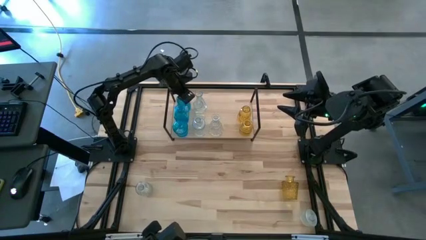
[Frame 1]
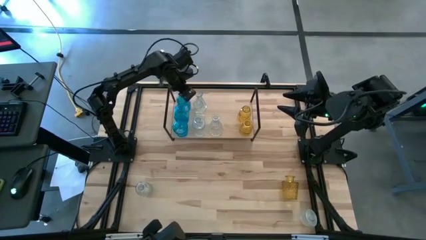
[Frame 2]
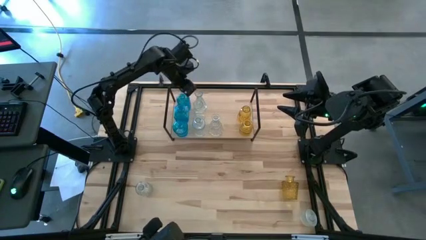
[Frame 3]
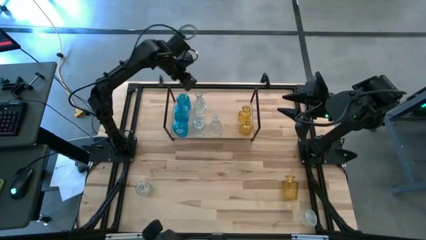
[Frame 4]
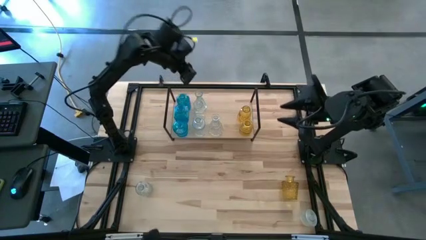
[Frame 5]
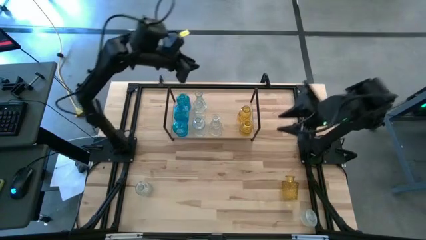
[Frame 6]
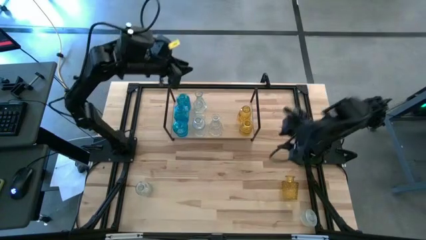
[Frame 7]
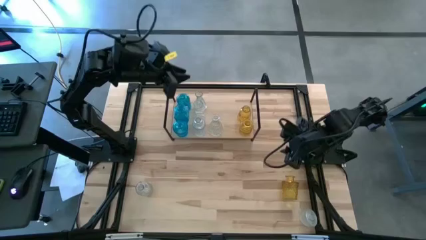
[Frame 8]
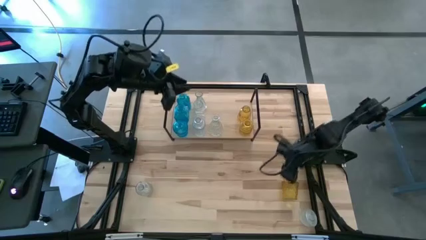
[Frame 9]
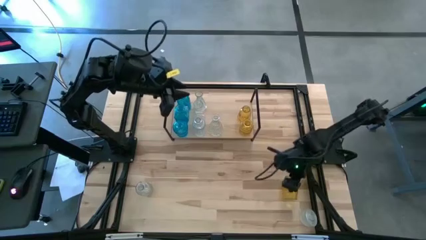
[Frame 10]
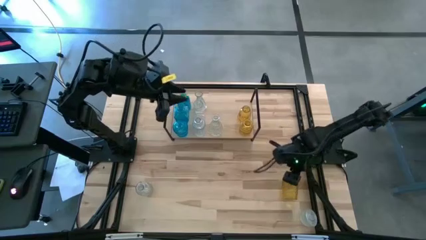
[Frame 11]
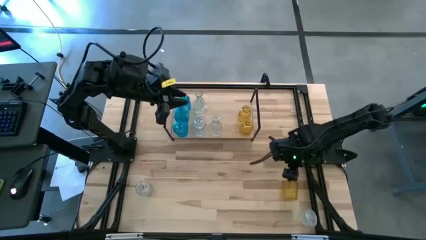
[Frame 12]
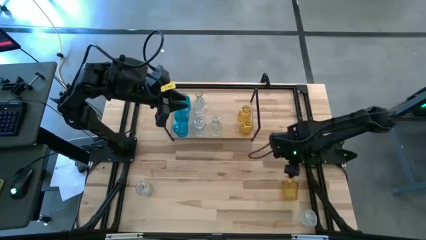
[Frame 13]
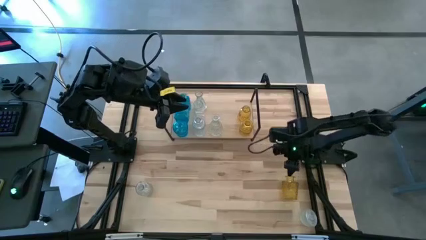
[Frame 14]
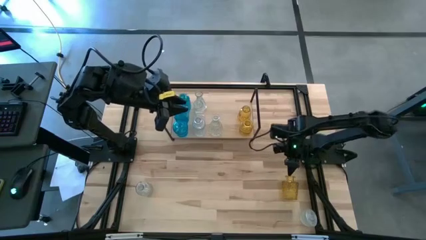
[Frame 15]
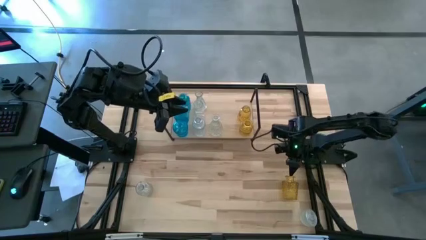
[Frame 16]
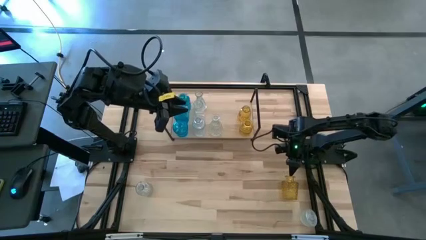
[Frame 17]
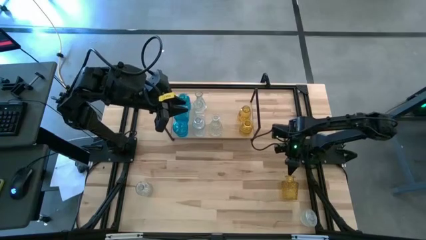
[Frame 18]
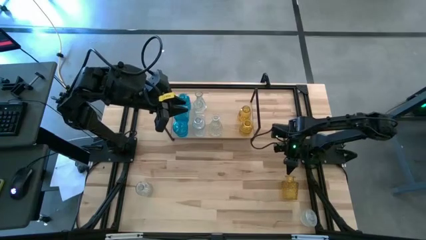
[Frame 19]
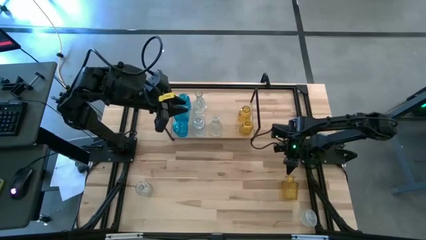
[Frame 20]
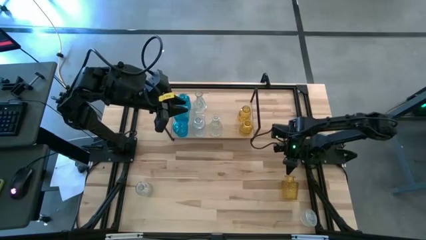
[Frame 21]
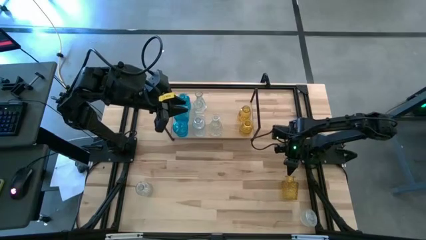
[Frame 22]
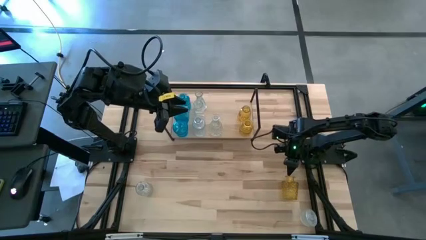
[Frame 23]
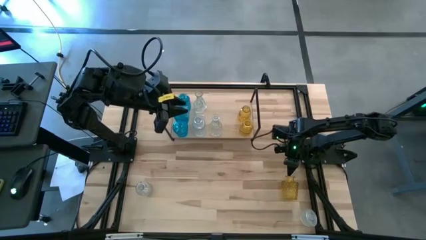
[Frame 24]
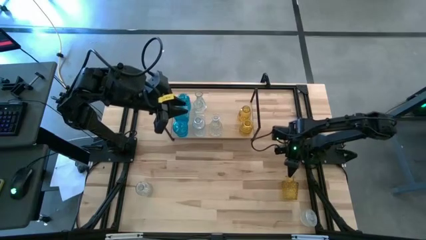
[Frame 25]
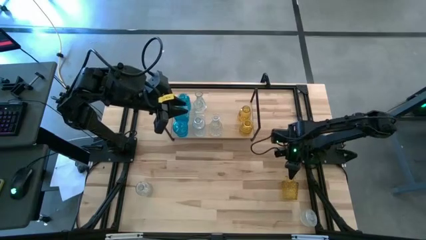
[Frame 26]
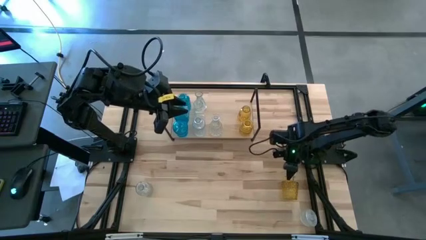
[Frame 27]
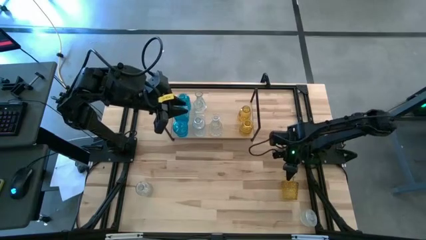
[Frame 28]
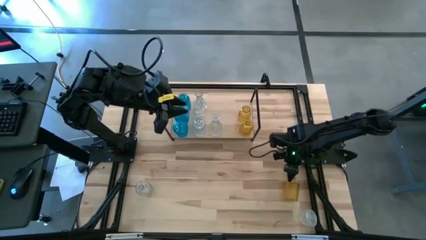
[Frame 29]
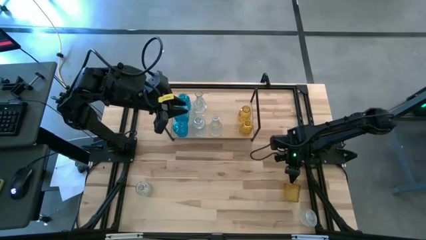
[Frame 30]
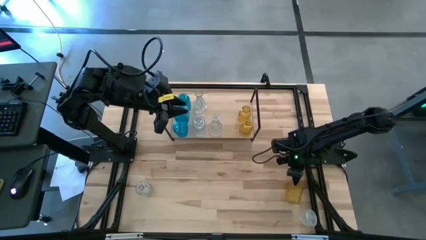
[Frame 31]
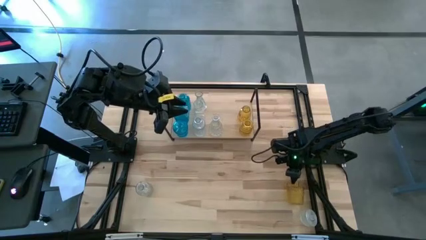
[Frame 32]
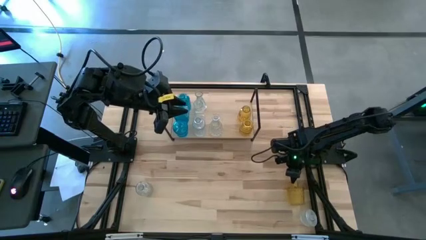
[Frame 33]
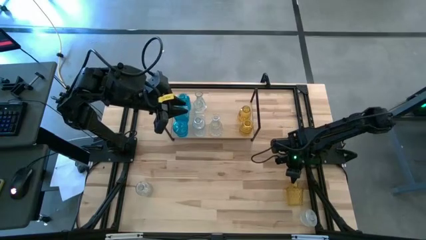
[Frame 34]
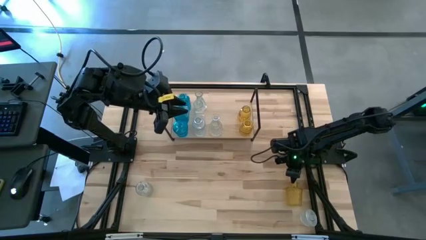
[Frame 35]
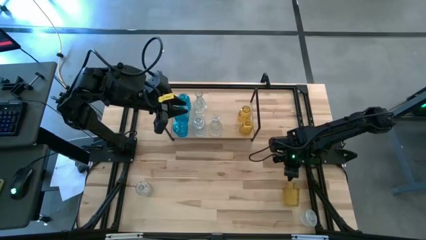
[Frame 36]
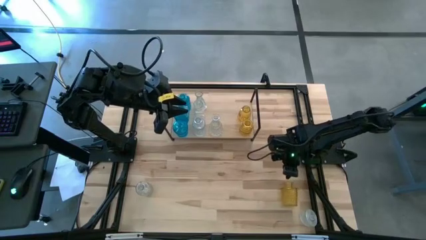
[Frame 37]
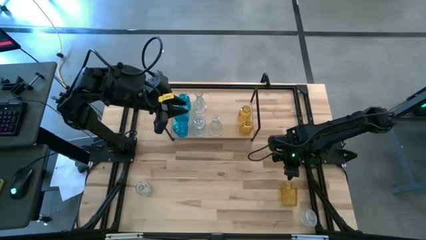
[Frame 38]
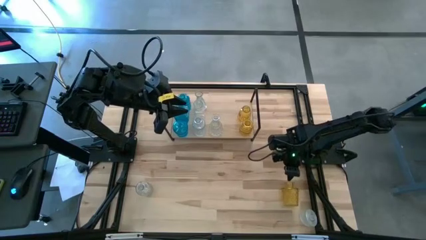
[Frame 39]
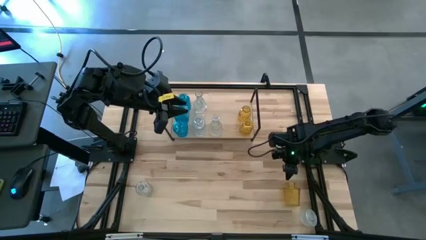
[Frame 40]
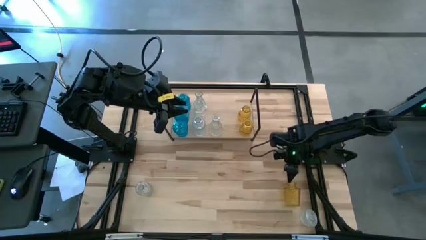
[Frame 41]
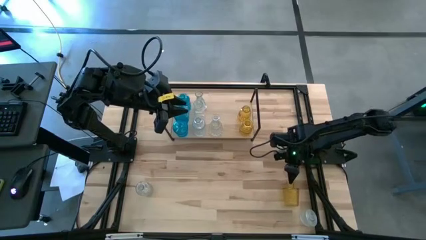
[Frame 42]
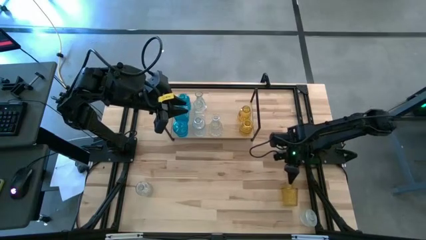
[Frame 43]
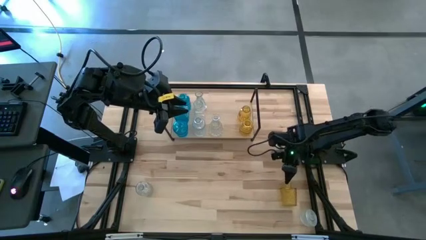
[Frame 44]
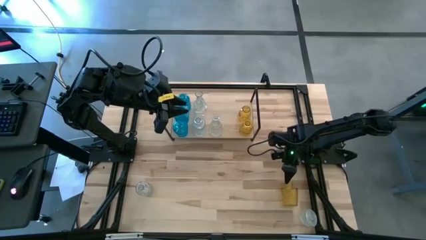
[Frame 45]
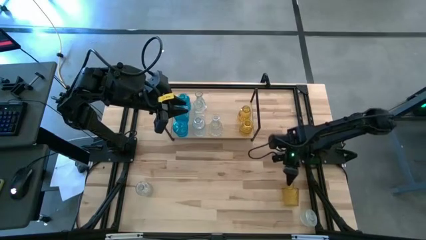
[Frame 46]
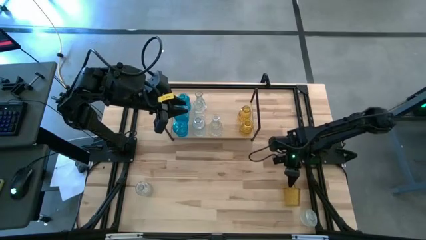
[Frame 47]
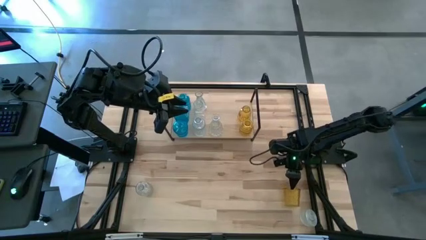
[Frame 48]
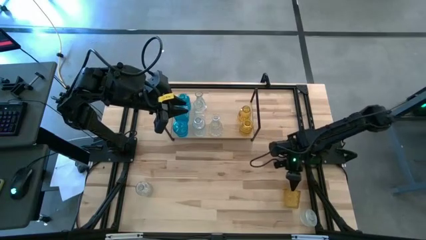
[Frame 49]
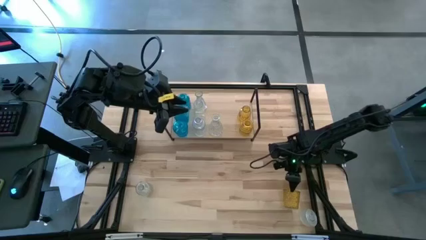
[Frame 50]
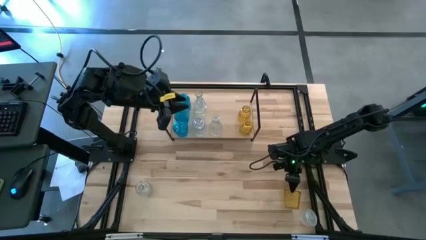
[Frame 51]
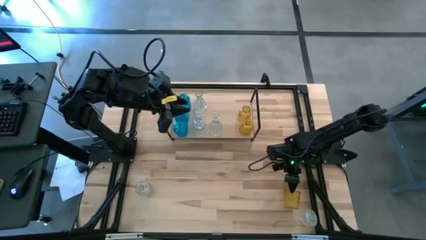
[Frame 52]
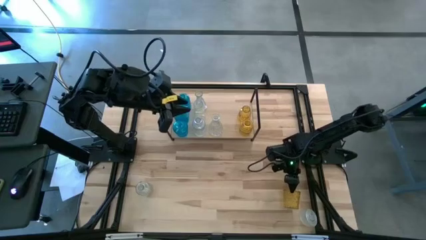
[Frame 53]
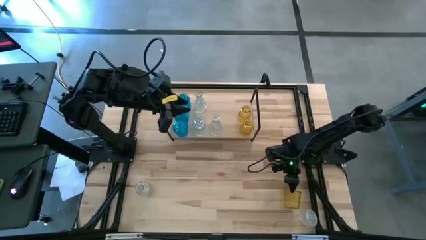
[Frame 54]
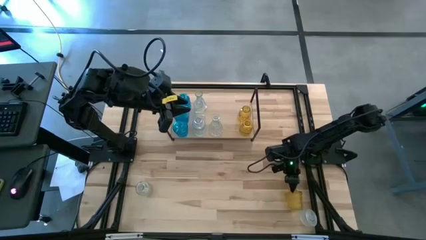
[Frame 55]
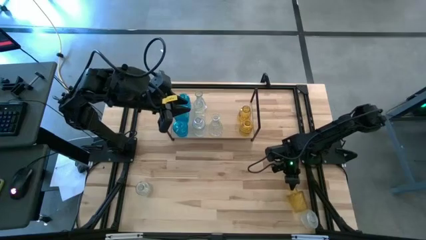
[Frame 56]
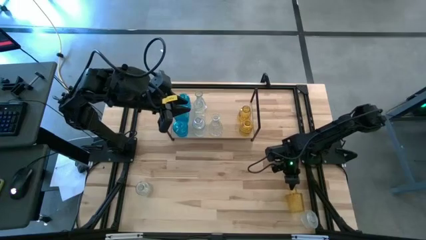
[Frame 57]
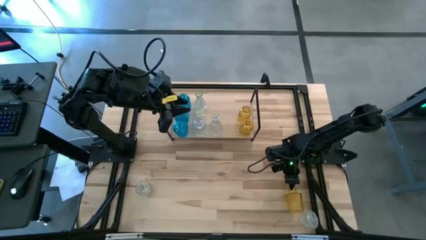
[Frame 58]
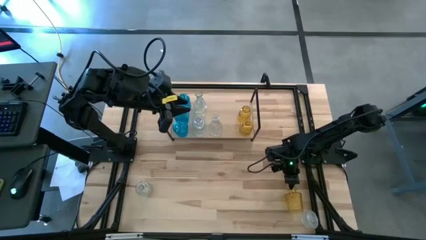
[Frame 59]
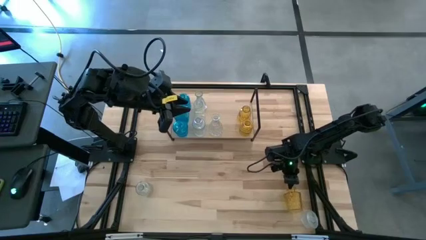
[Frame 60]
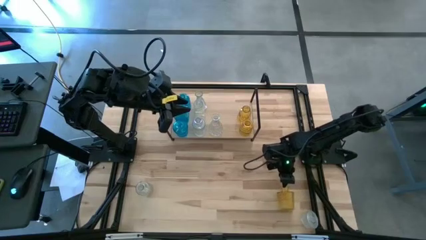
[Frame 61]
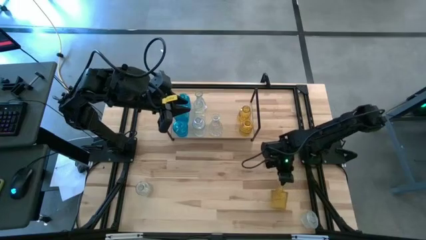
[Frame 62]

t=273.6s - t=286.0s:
Task: sort vases onto shelf
Put the yellow vase on the shelf aligned with the other yellow vases

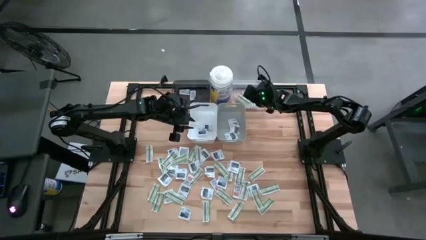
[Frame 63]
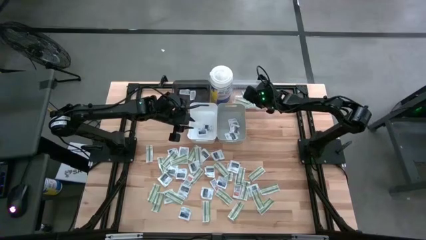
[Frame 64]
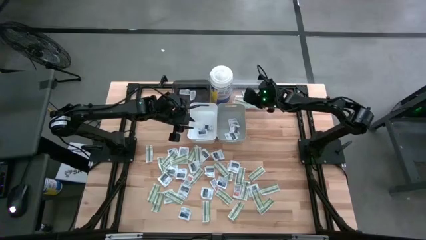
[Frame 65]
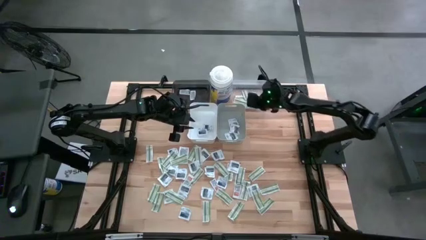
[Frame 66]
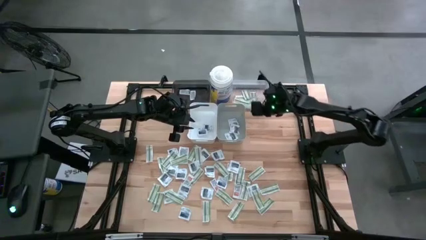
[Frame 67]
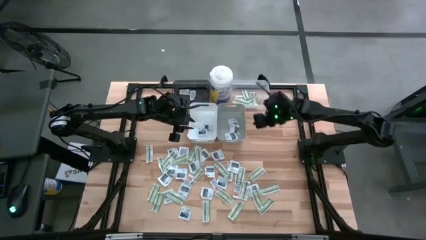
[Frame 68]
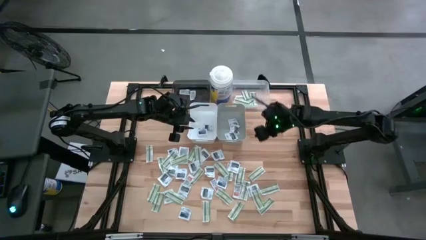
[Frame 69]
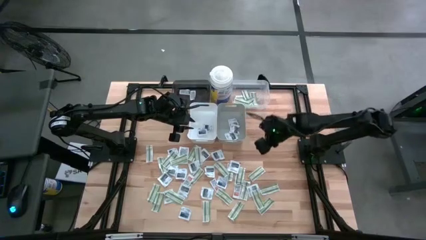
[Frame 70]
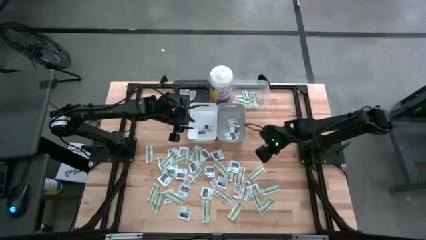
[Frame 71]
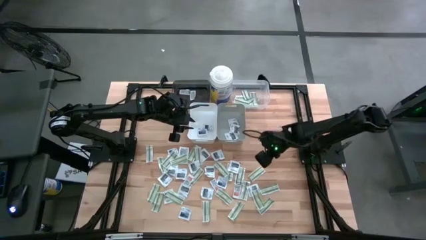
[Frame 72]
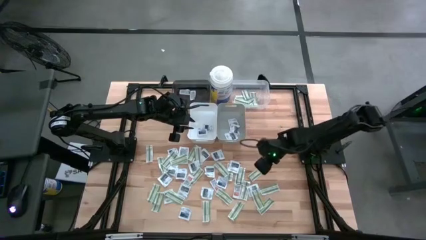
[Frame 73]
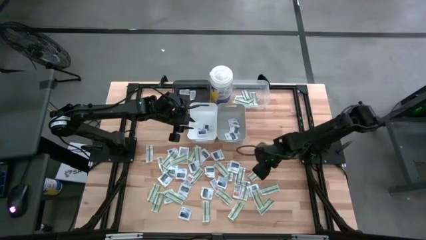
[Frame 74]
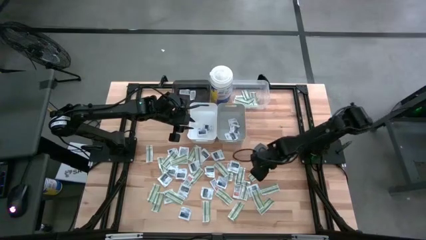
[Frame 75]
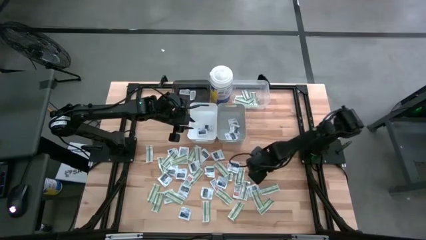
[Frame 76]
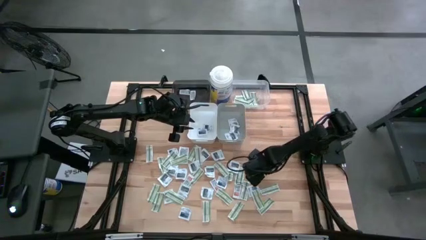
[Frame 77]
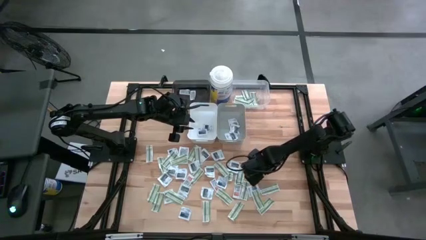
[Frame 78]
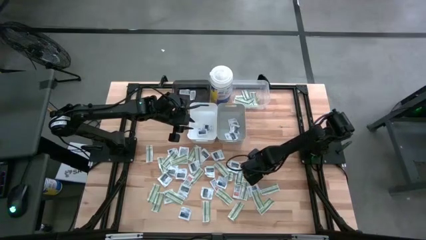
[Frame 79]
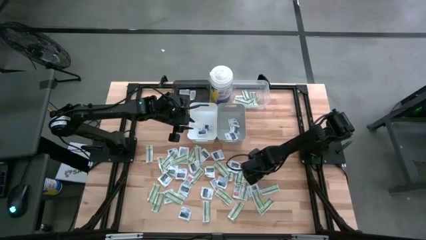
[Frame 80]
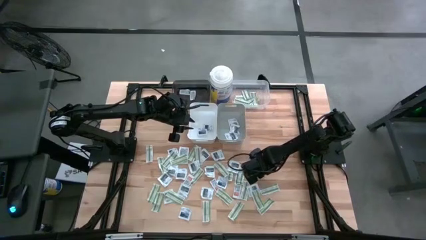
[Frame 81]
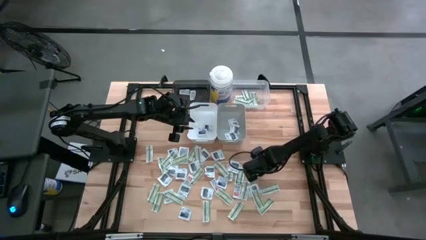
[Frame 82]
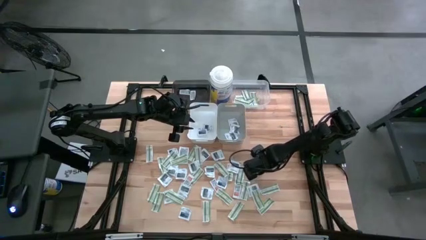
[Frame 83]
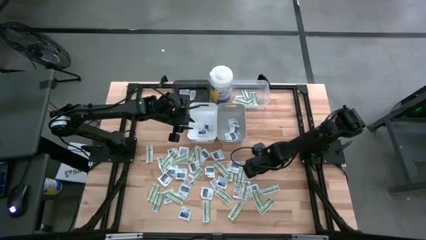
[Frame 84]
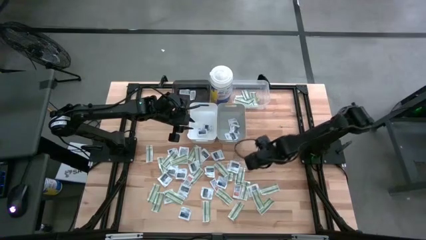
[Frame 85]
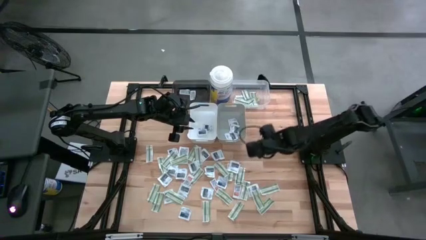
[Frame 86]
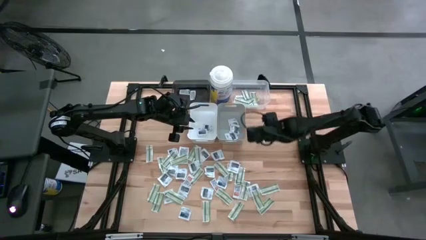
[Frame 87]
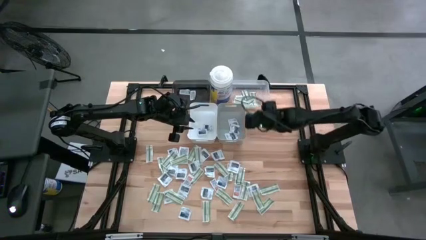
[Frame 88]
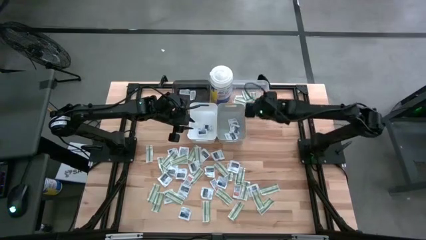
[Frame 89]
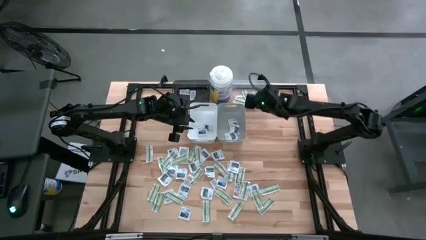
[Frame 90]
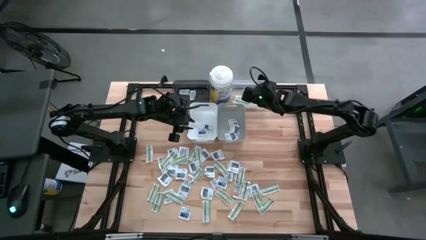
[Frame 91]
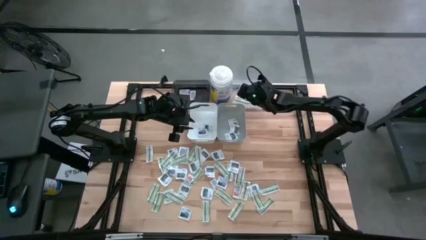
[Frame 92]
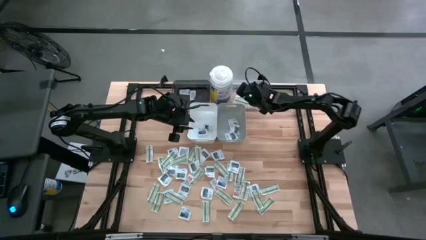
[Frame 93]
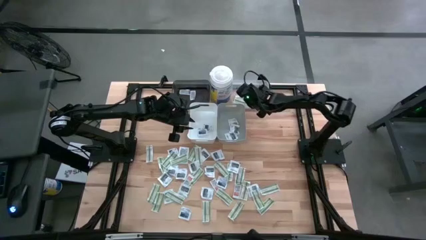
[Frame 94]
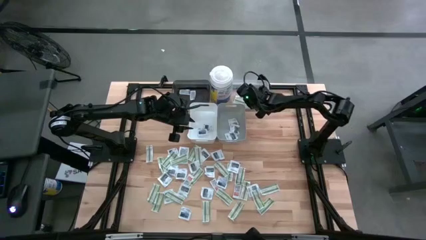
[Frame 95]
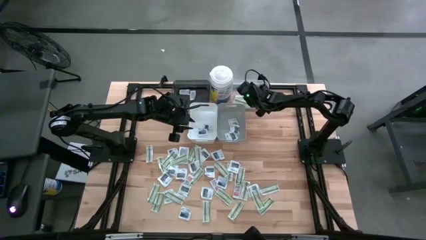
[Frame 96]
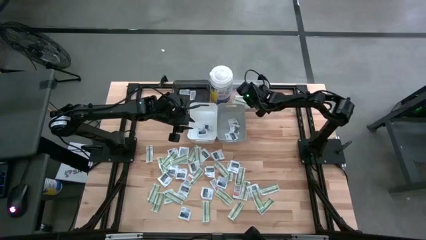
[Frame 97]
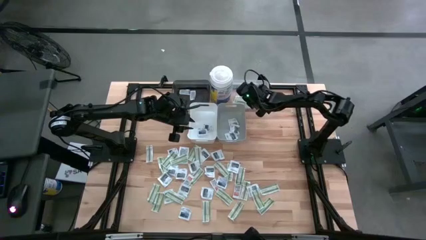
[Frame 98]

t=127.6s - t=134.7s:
Task: Pick & Place First Aid Supplies
Put the band aid into the transparent bin
